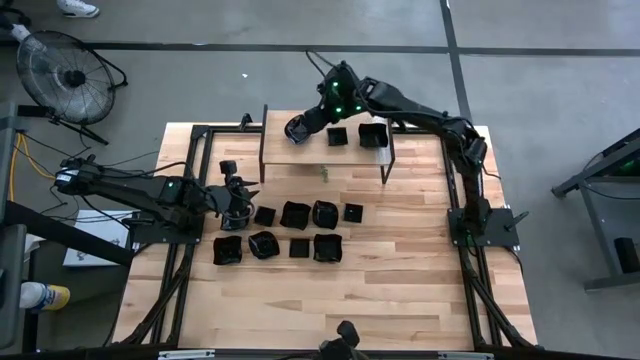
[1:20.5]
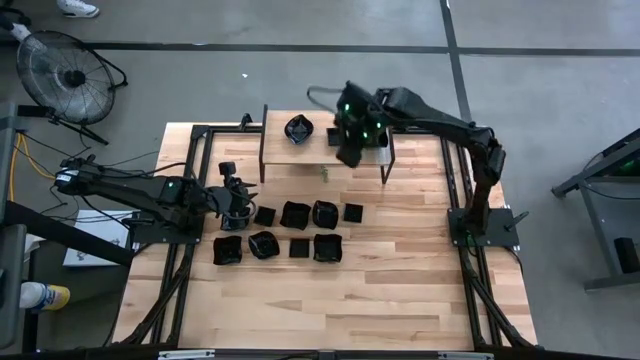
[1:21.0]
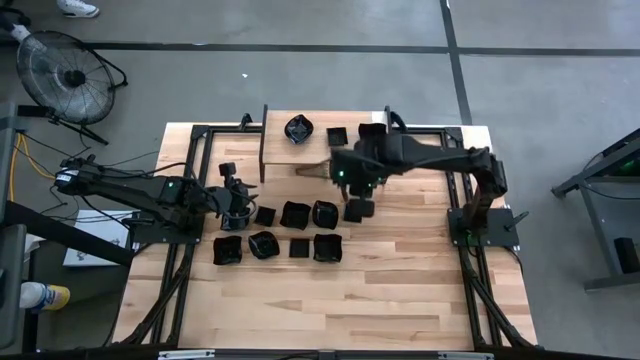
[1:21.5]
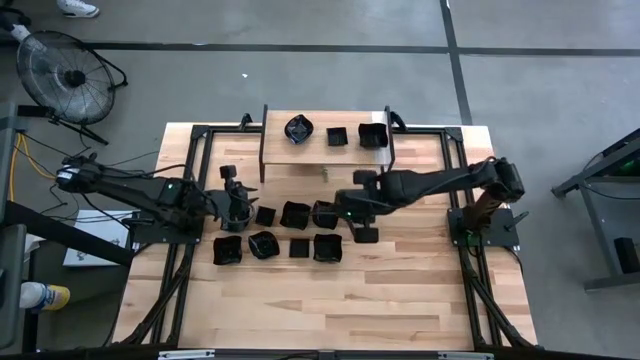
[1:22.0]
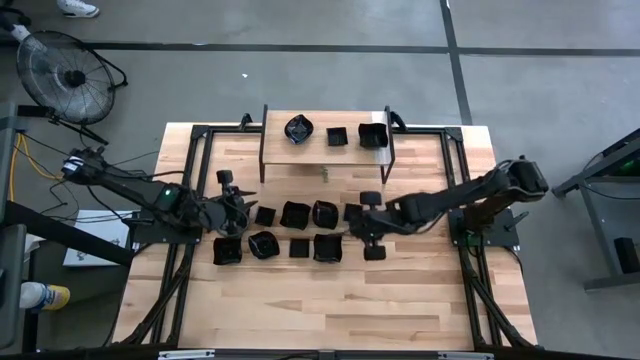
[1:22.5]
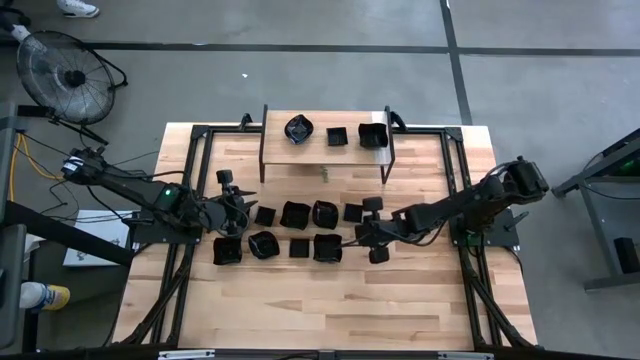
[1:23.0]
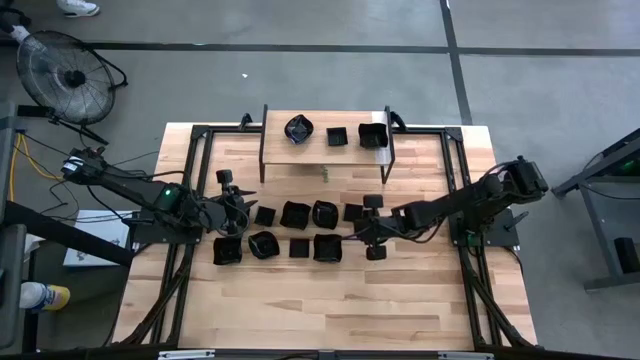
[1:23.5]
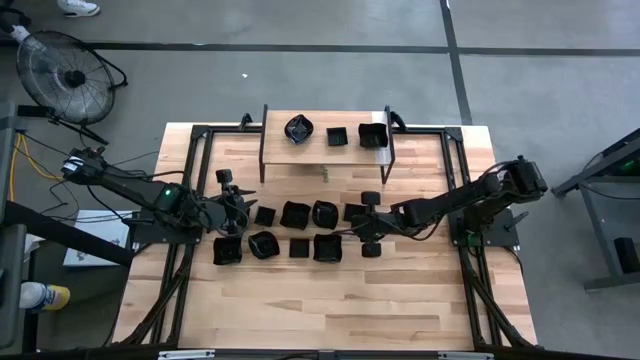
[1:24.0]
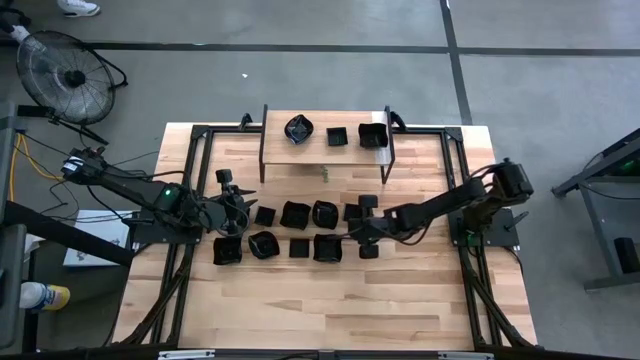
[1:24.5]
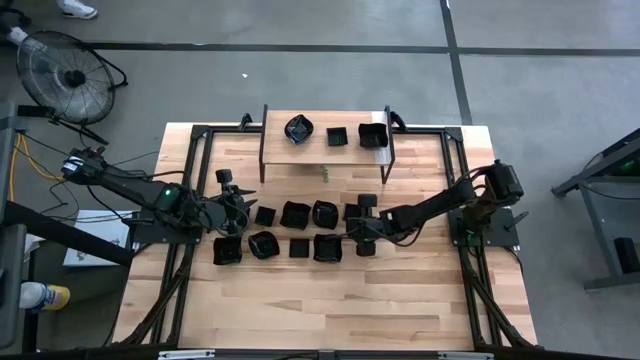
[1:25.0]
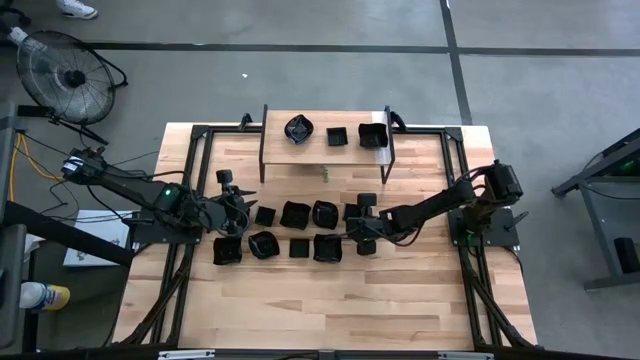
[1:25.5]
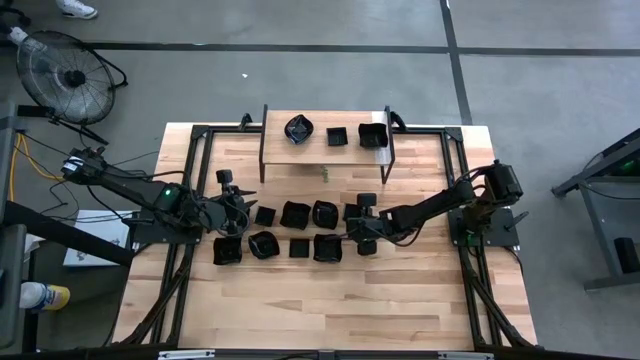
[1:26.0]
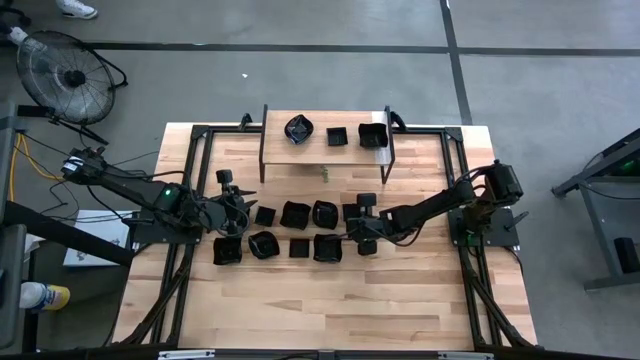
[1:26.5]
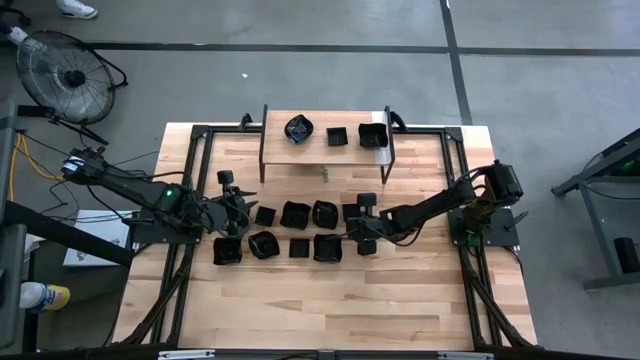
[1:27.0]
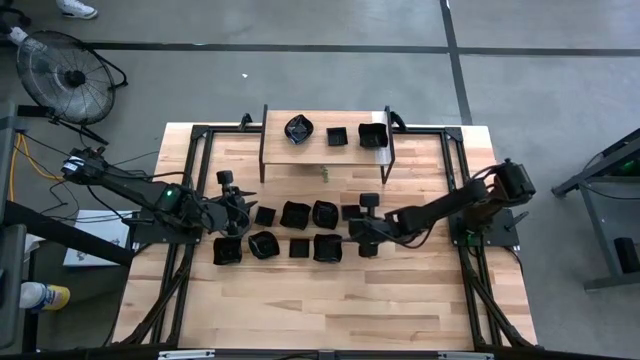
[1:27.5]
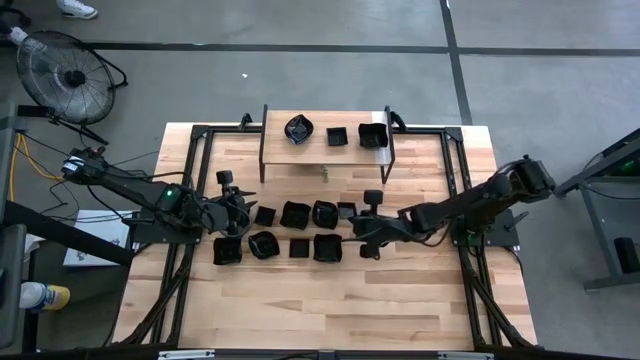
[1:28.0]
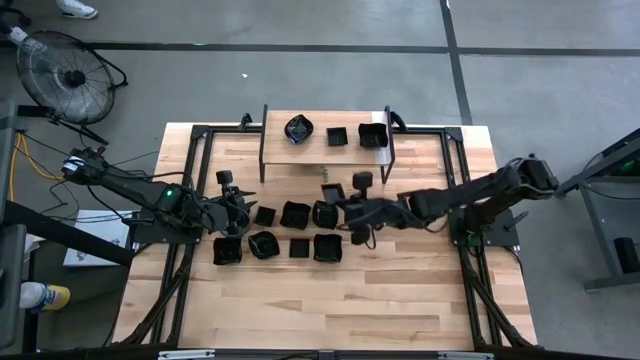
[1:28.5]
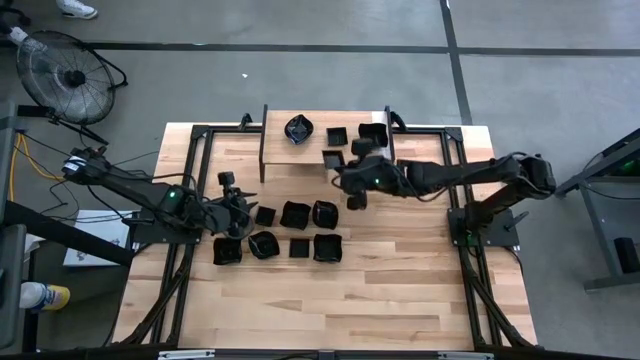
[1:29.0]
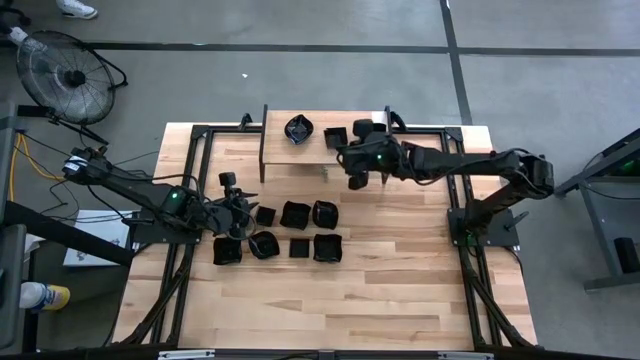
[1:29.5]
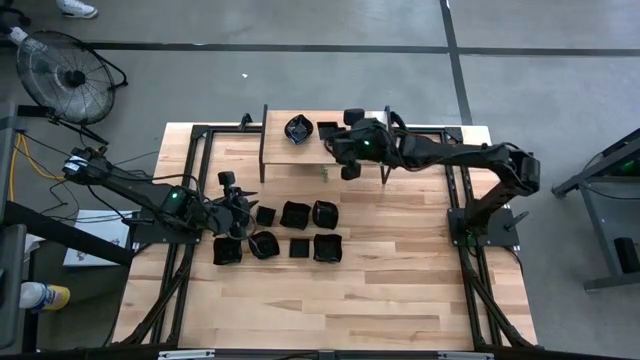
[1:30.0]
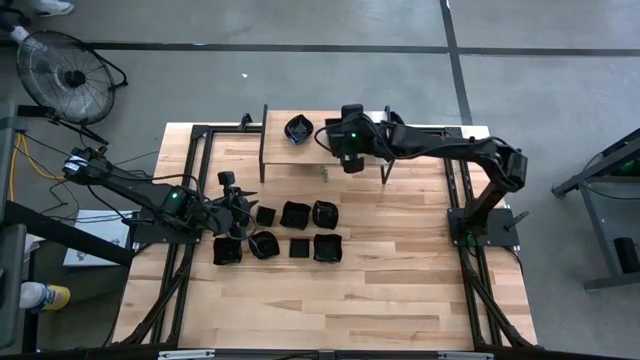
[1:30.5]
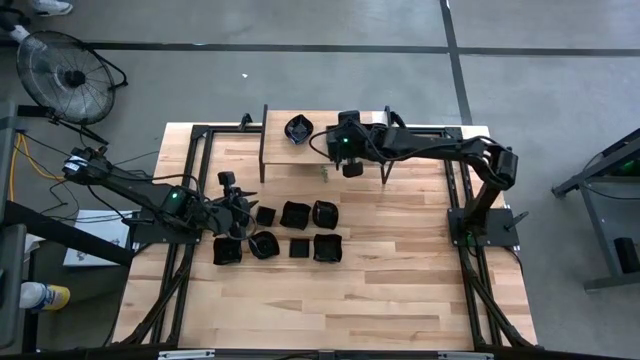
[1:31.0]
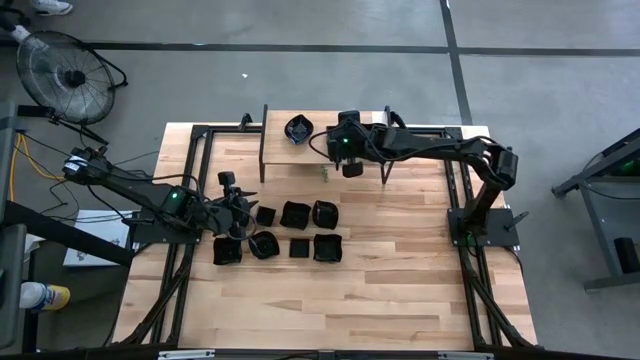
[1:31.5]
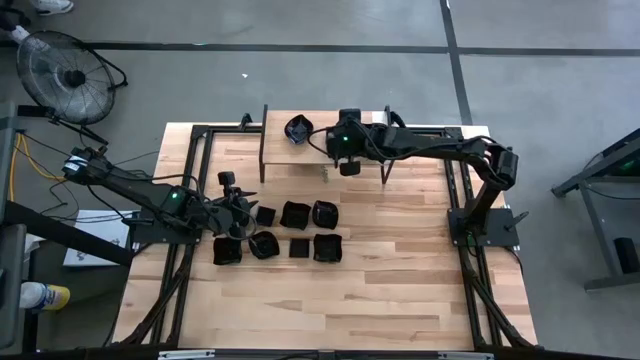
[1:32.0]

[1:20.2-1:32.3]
Task: Pick & Place Mini shaped plates
Stack the square plate on top of the other square plate on the shelf

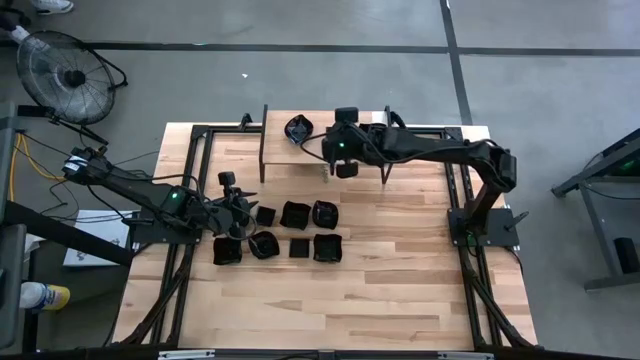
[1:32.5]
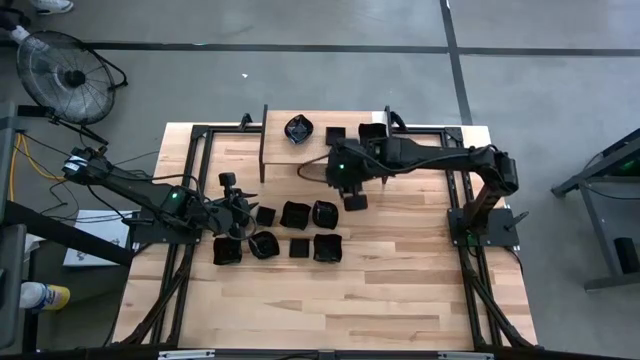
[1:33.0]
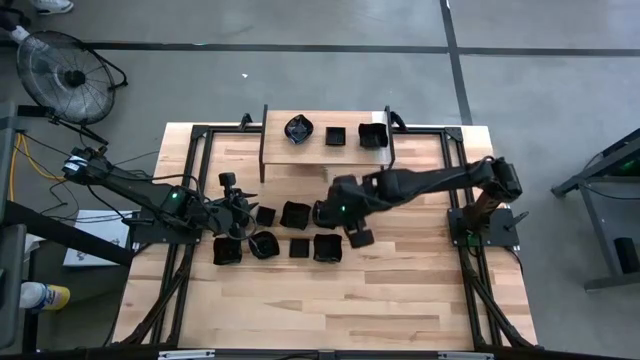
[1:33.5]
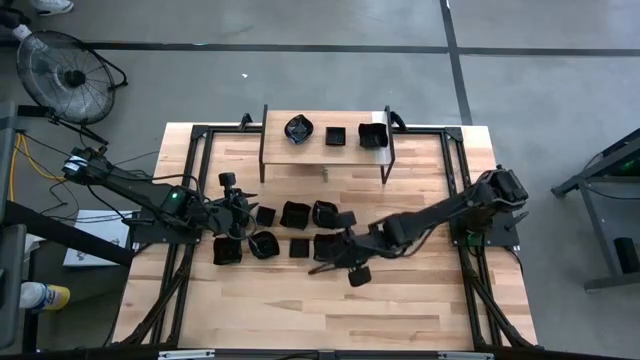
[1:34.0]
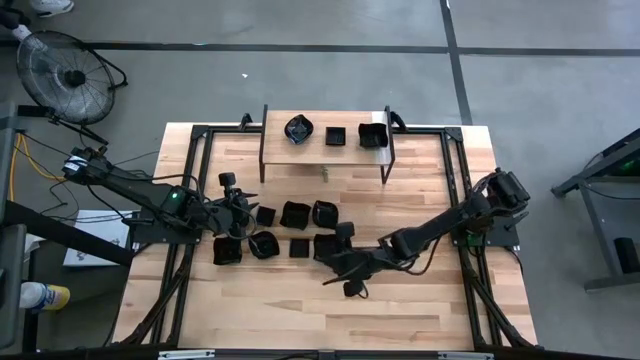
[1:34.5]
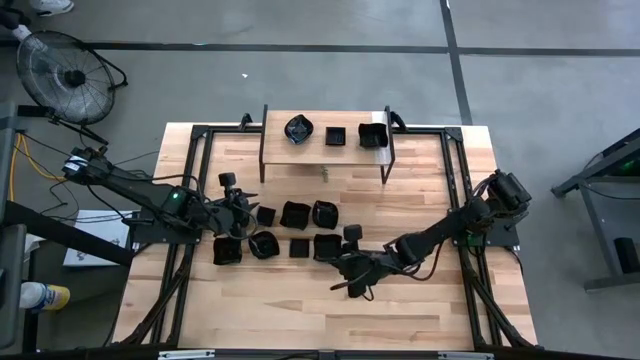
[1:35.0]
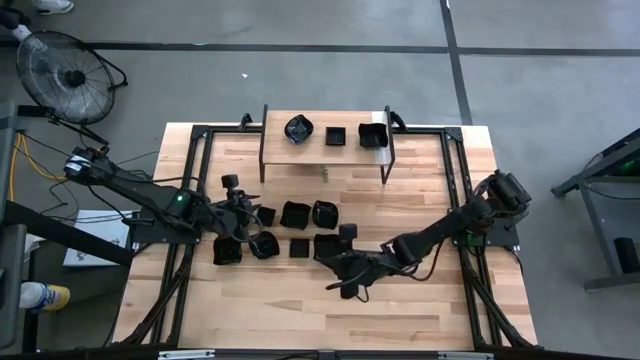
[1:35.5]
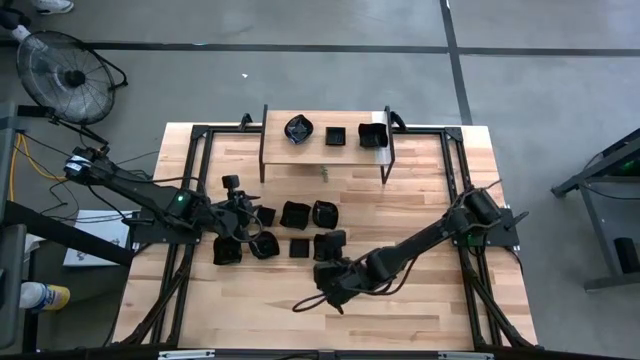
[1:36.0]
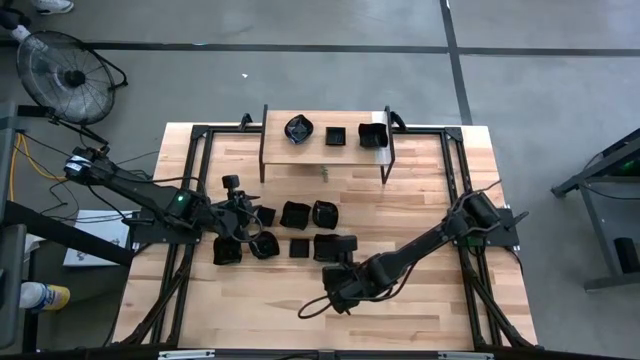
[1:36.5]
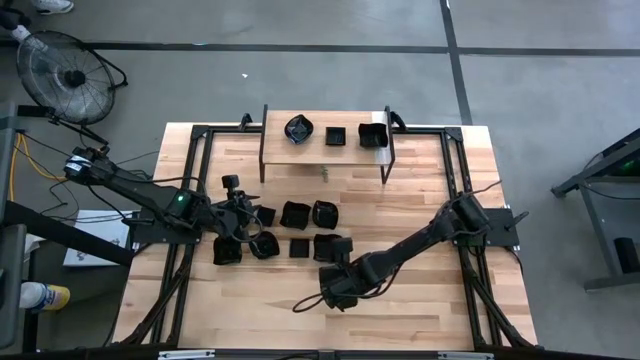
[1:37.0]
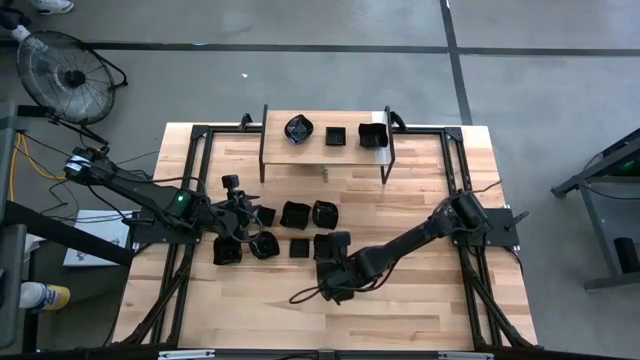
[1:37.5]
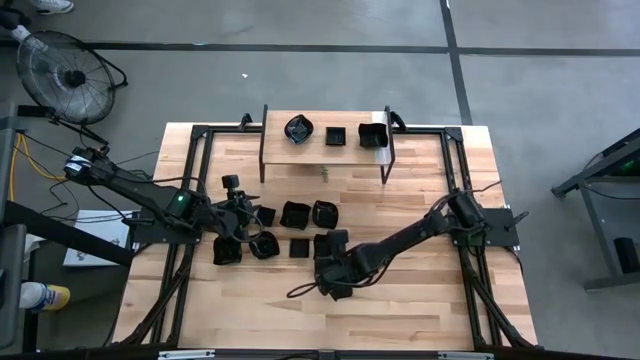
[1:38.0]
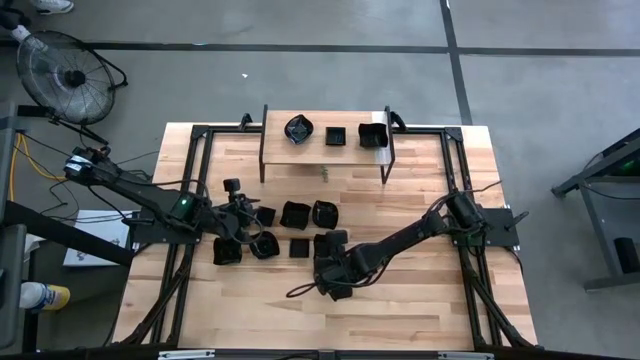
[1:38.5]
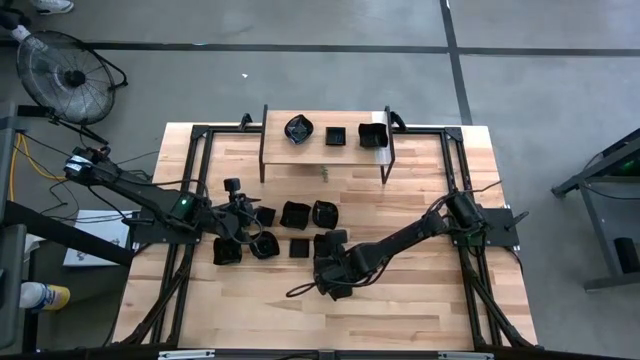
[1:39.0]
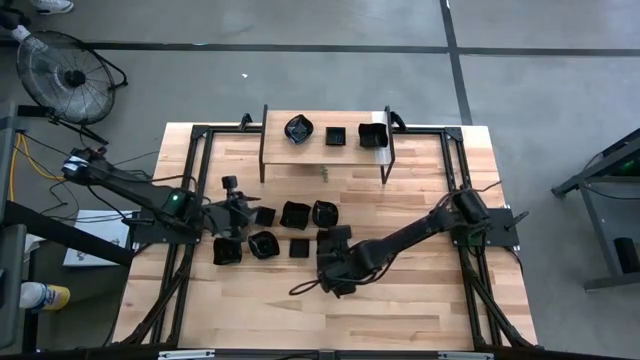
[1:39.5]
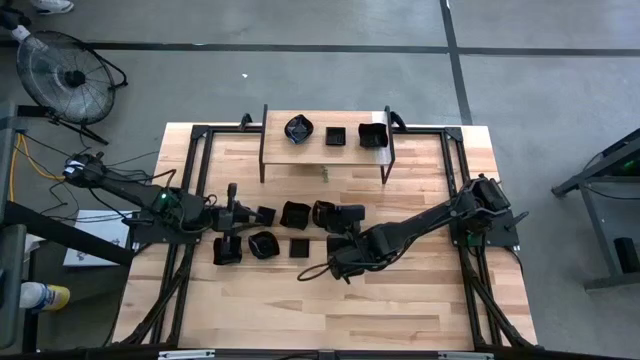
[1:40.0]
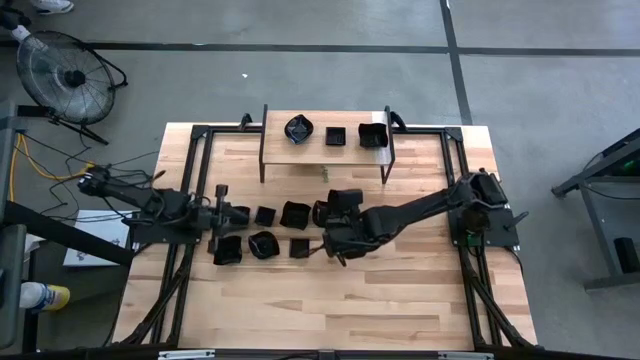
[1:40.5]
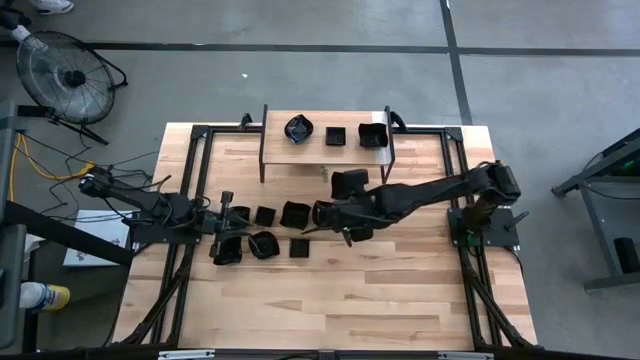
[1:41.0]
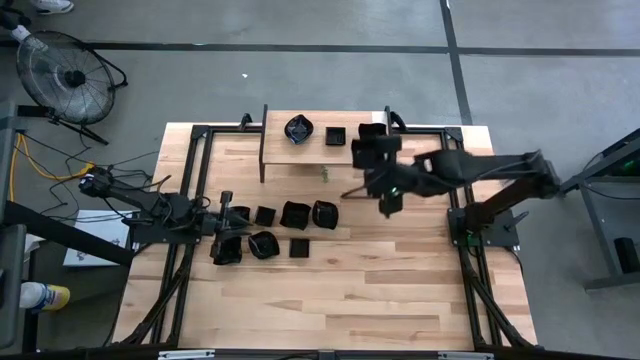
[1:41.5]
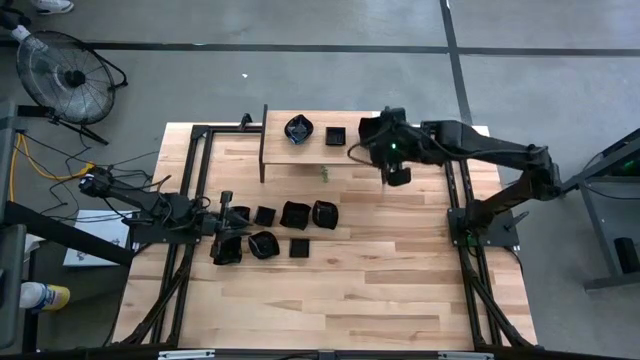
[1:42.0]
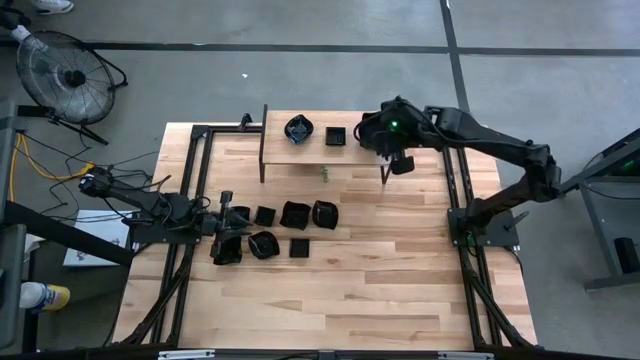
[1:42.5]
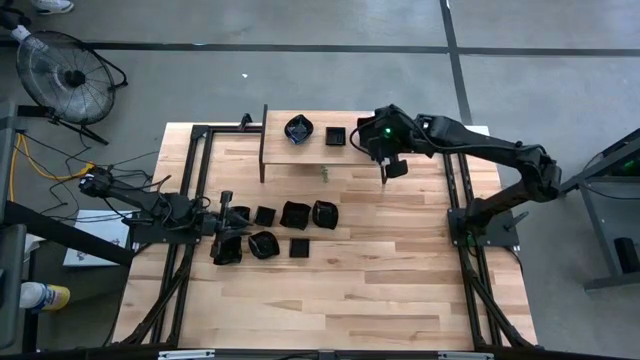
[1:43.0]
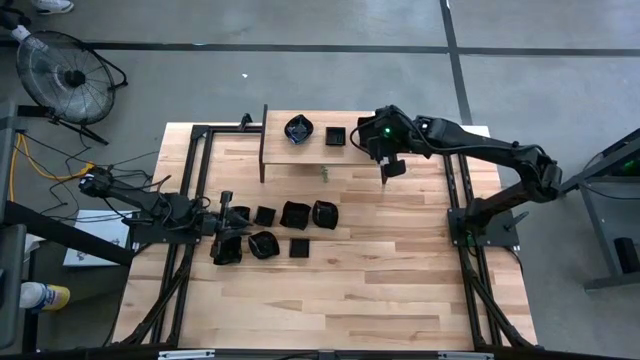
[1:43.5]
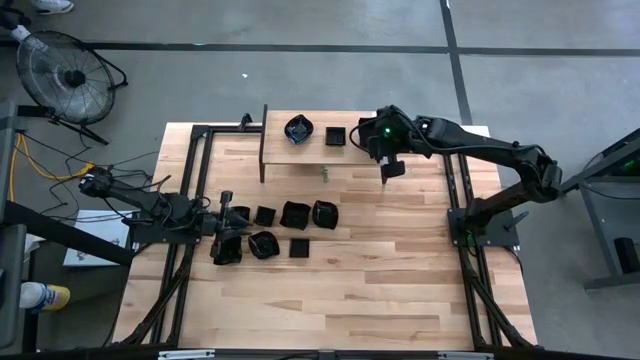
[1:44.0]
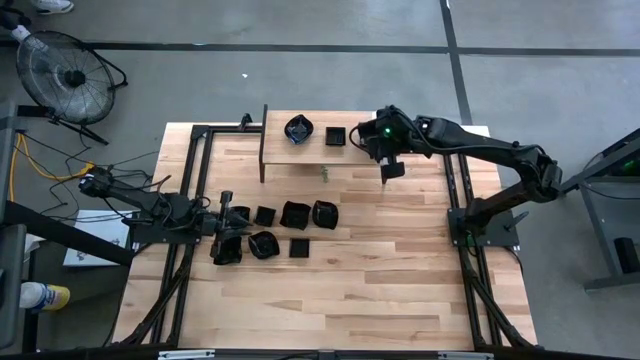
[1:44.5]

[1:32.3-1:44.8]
Stack the distorted square plate on top of the other distorted square plate on the shelf
